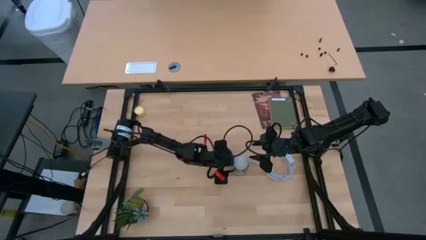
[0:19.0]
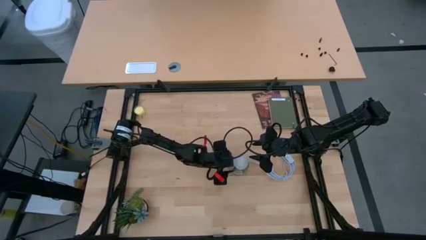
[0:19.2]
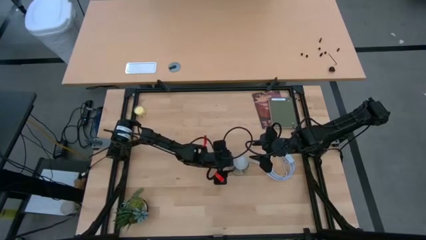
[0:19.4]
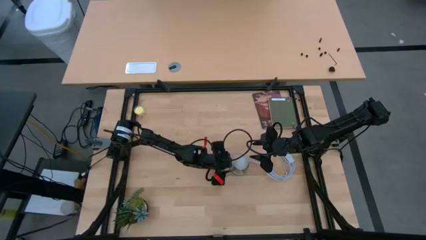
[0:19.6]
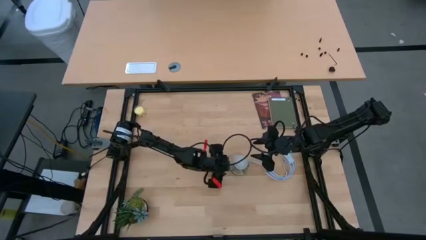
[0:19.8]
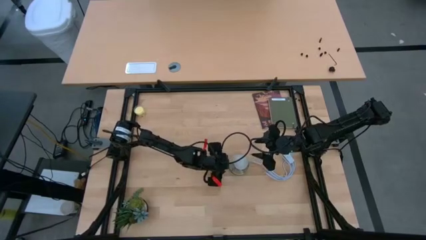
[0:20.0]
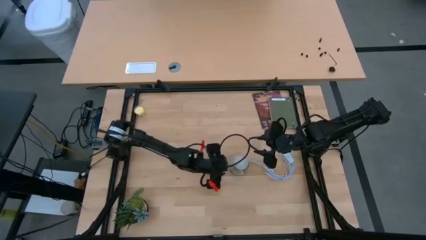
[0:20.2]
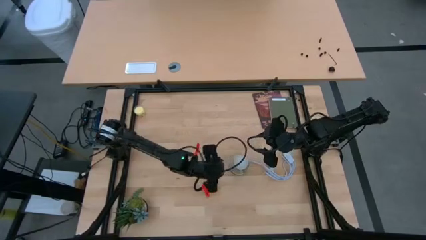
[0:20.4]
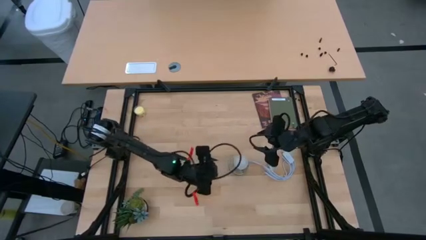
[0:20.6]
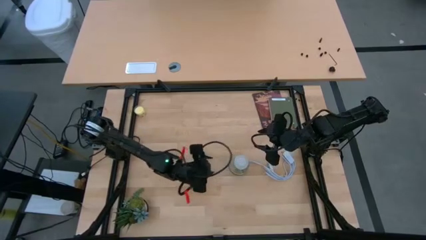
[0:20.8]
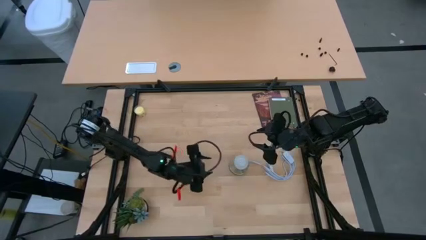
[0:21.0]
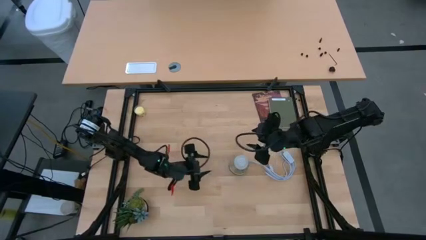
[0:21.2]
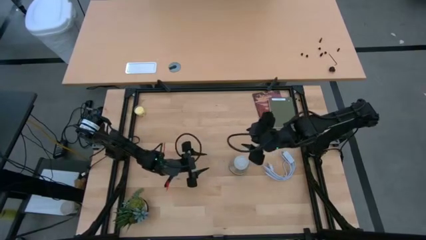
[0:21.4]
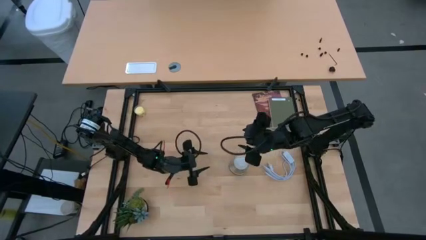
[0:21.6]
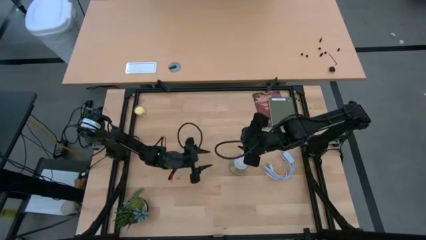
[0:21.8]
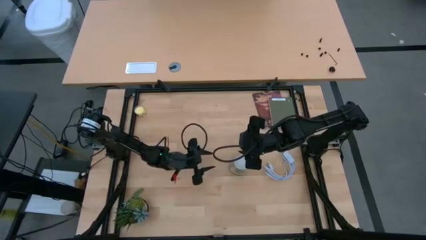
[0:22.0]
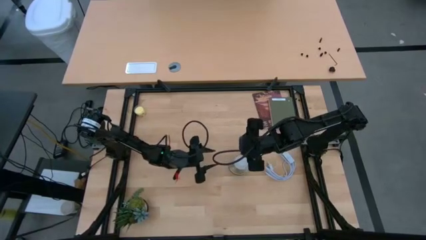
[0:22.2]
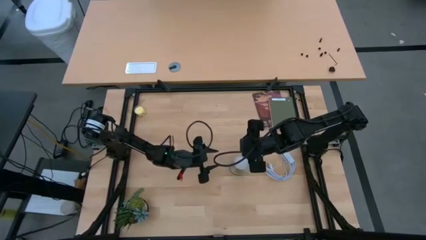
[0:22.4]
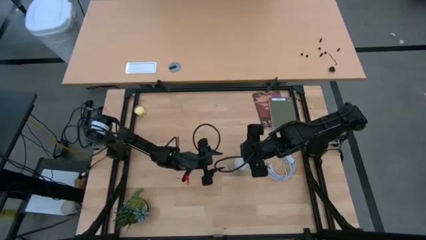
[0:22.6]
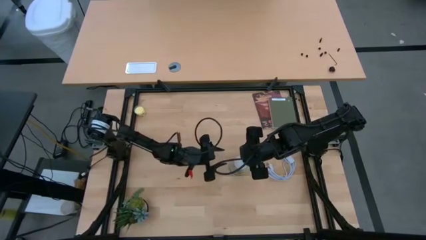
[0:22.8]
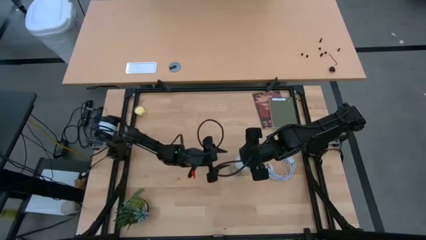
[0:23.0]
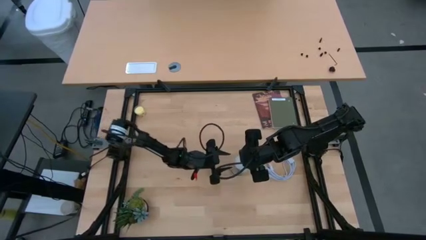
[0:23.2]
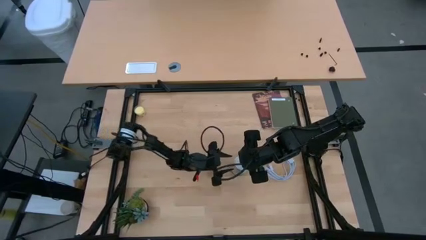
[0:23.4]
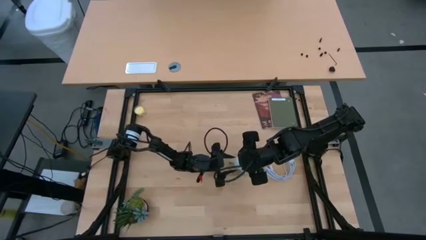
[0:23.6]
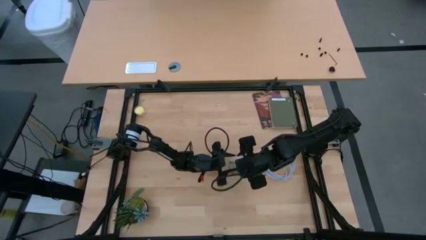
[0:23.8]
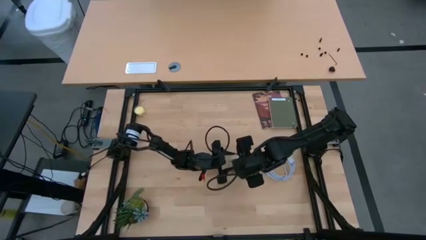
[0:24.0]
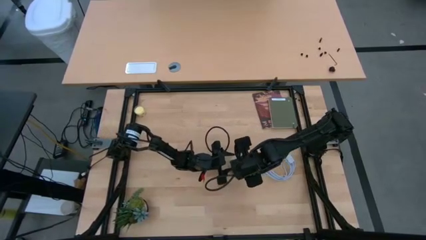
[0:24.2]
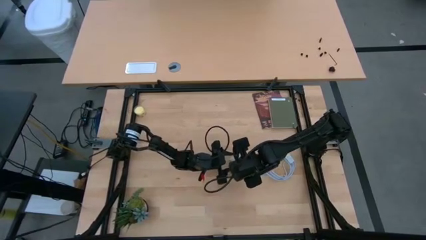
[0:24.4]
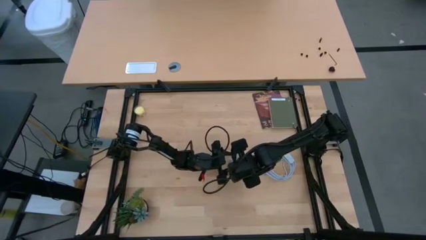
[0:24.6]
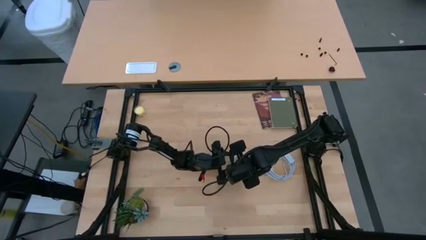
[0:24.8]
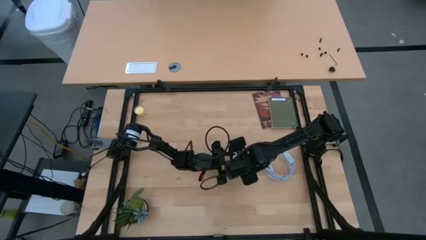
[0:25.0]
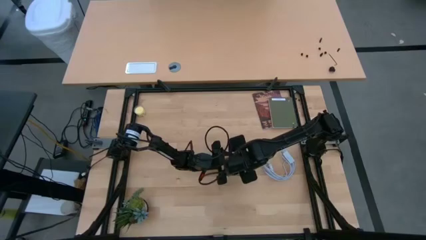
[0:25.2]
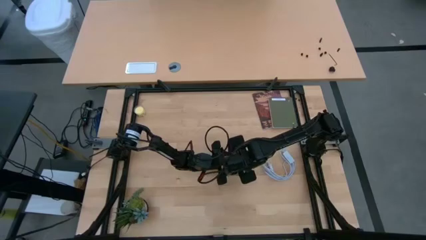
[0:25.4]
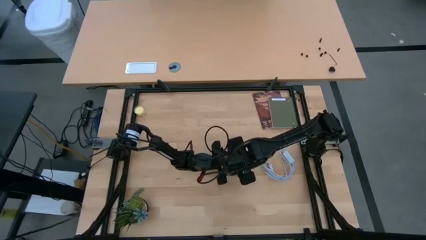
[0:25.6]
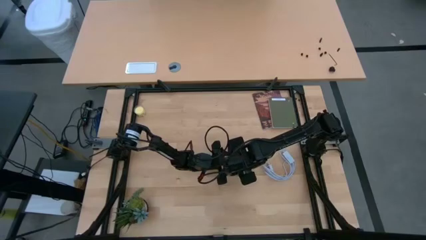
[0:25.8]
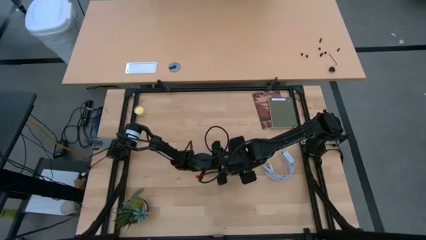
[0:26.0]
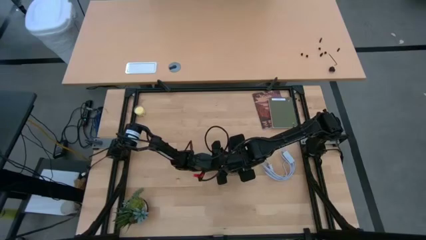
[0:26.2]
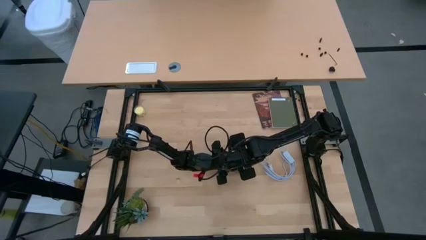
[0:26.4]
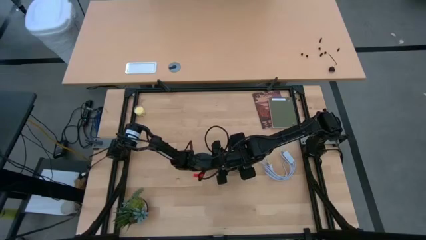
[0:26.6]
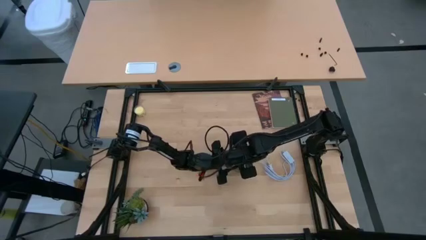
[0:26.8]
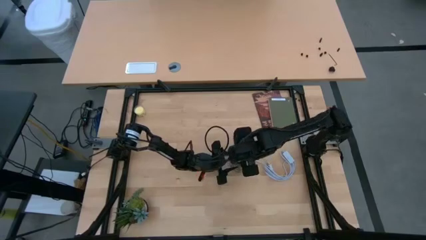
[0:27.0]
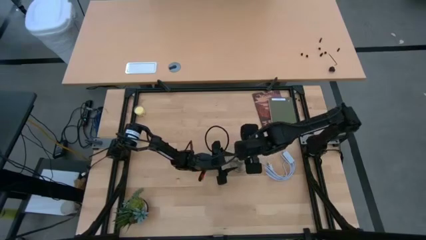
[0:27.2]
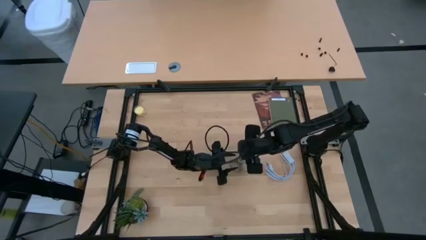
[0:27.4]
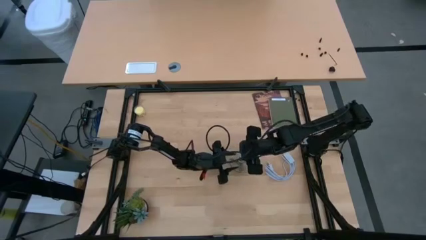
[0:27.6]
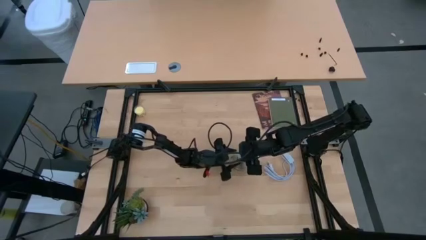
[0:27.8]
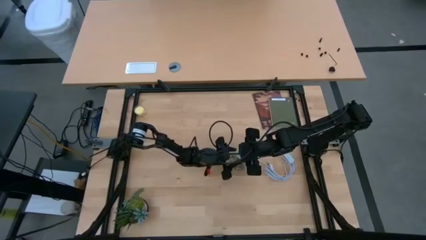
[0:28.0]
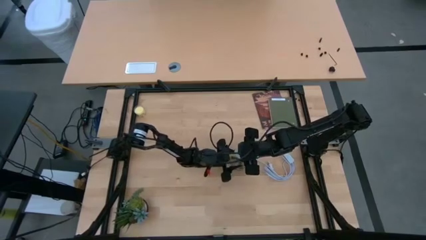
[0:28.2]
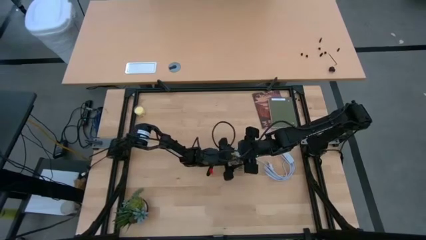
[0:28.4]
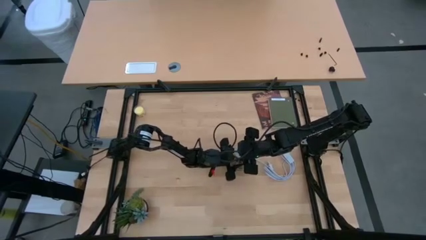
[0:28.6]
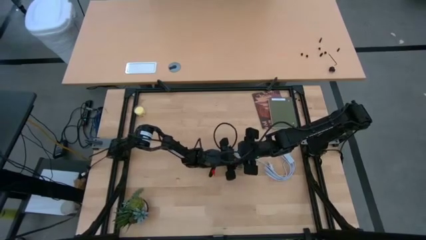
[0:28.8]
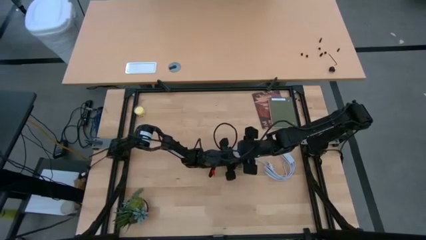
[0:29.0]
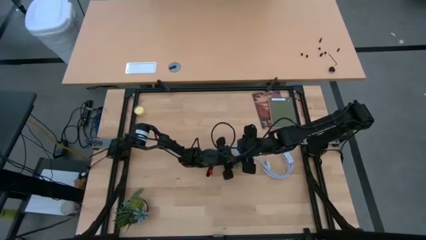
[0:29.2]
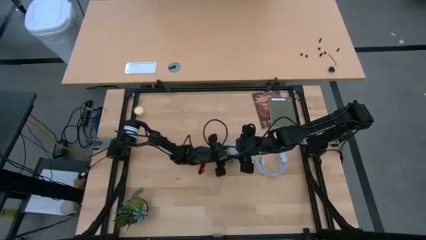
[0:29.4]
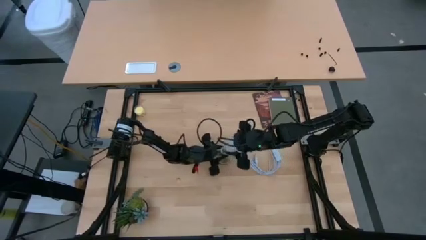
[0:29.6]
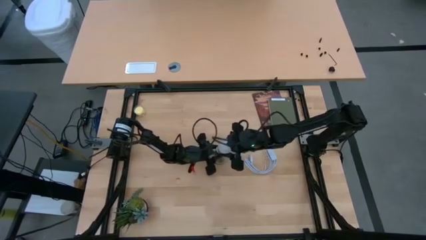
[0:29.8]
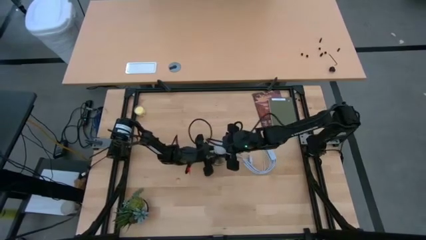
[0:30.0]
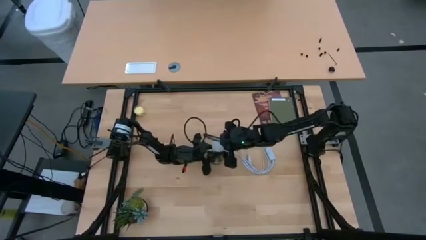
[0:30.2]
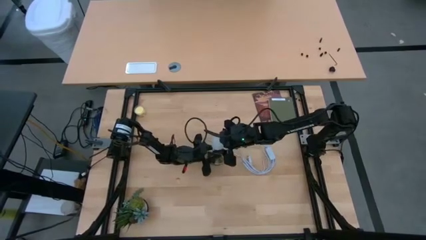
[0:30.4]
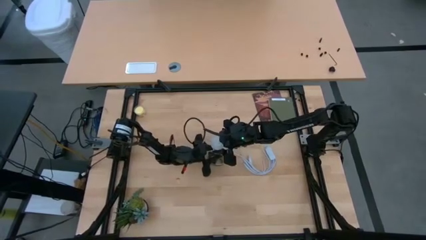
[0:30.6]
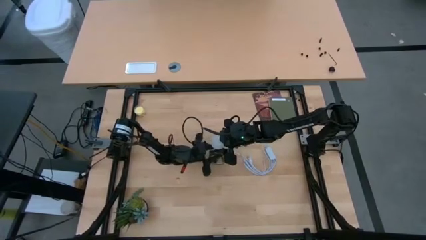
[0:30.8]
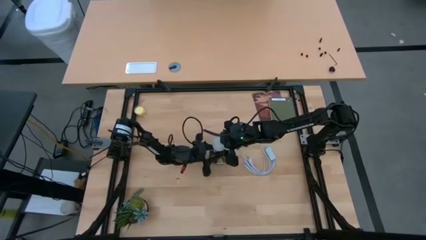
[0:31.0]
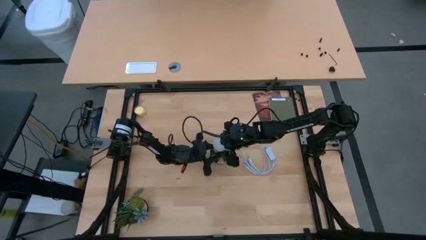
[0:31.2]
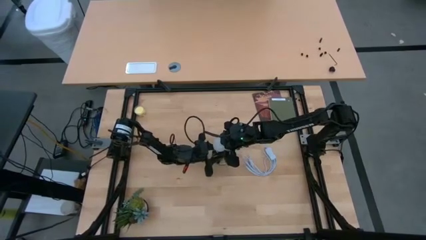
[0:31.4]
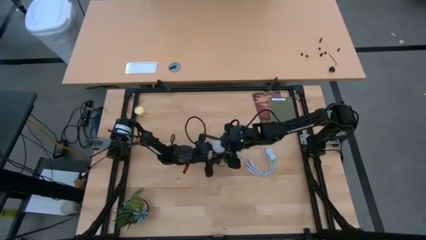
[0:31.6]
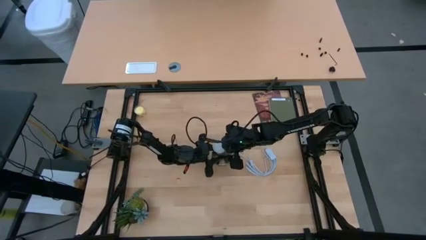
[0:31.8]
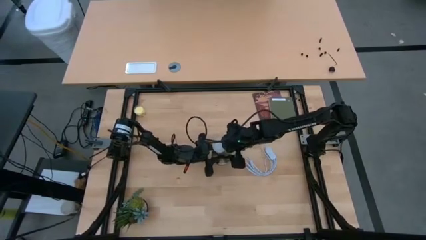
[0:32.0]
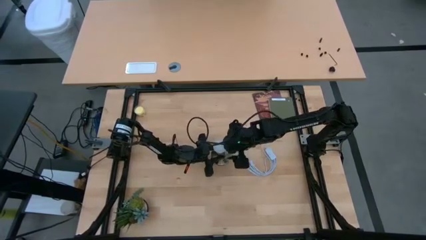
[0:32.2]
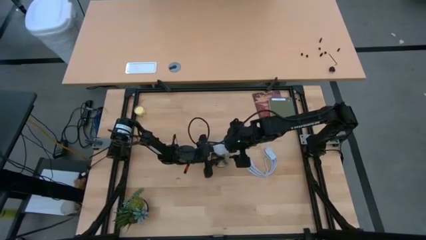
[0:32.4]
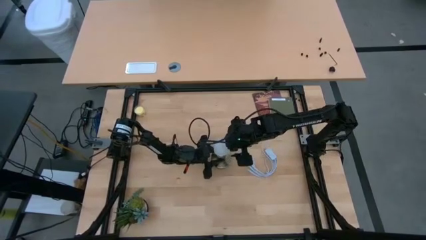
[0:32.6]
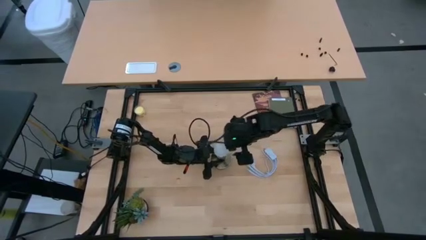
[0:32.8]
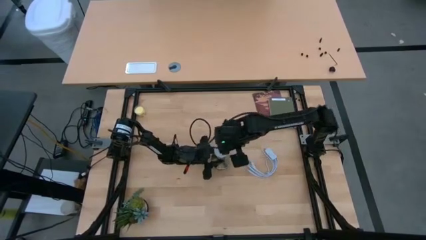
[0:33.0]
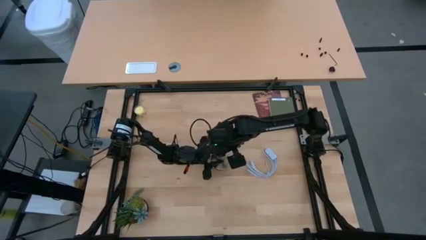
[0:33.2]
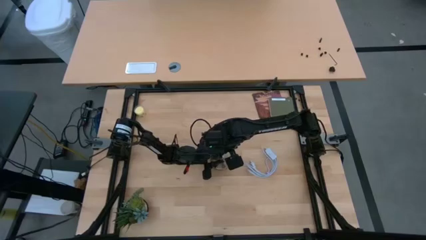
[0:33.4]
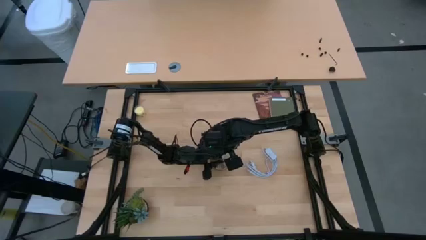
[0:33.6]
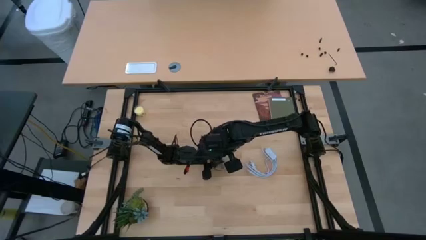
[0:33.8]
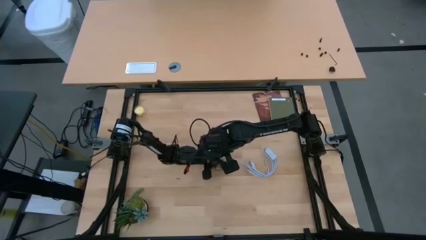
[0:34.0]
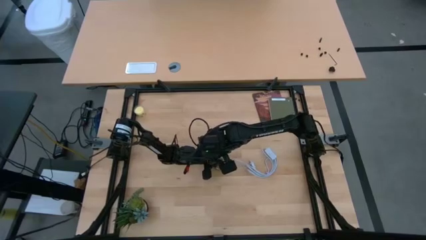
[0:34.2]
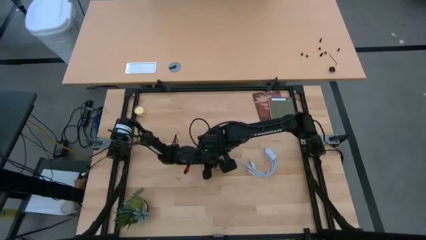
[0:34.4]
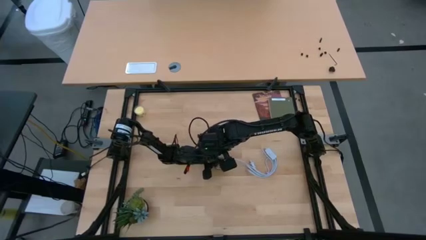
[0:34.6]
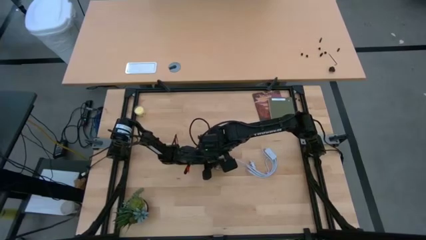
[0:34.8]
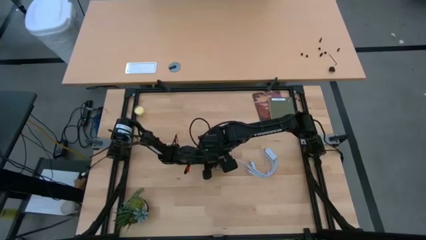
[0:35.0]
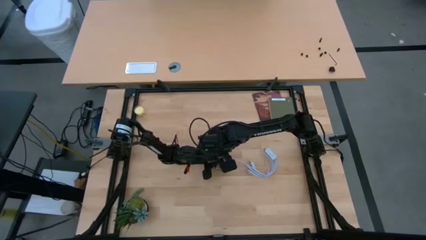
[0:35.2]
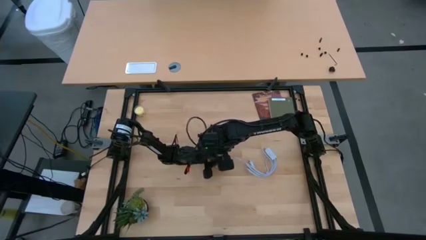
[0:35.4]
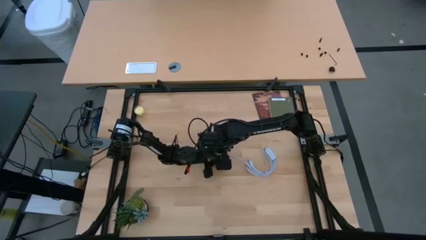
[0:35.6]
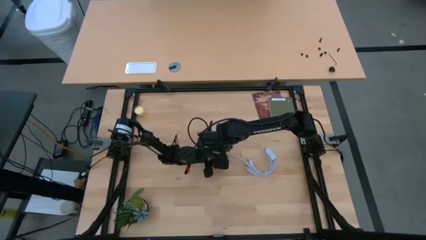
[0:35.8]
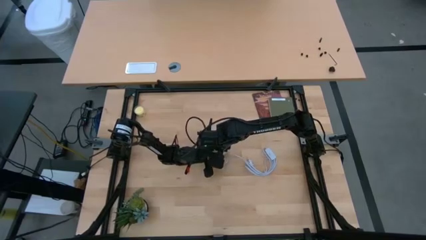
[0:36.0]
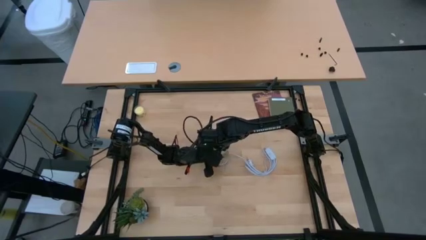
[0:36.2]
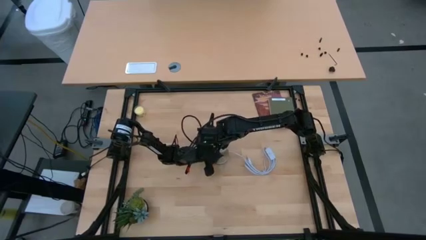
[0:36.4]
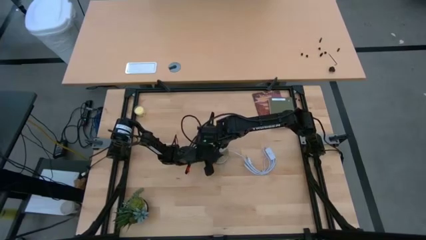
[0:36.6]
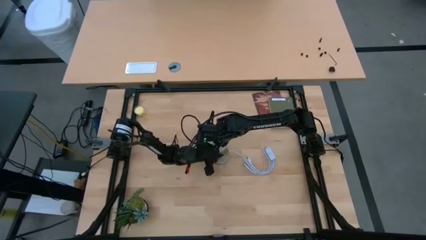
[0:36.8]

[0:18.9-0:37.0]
Task: Screw lightbulb
Insert the lightbulb into the lamp
